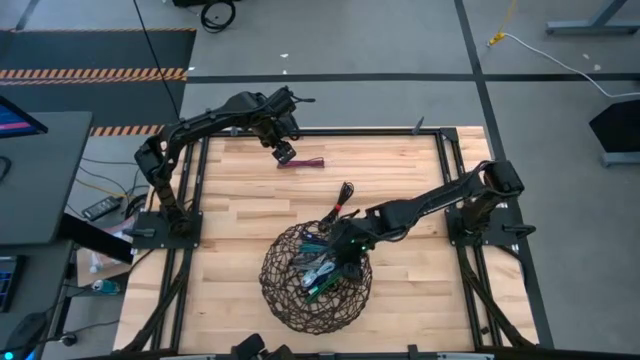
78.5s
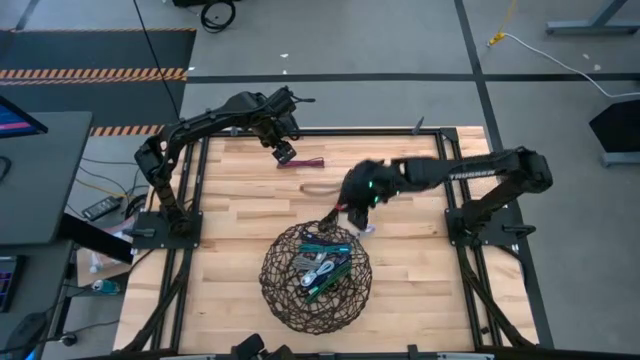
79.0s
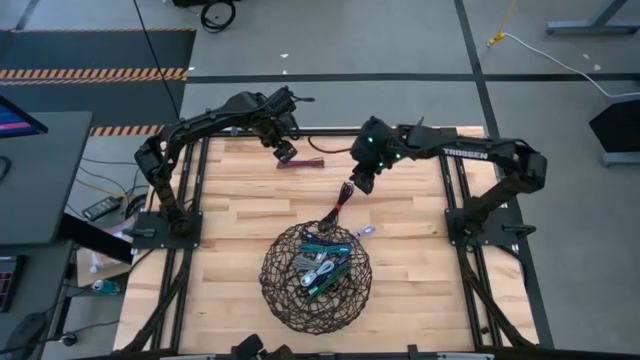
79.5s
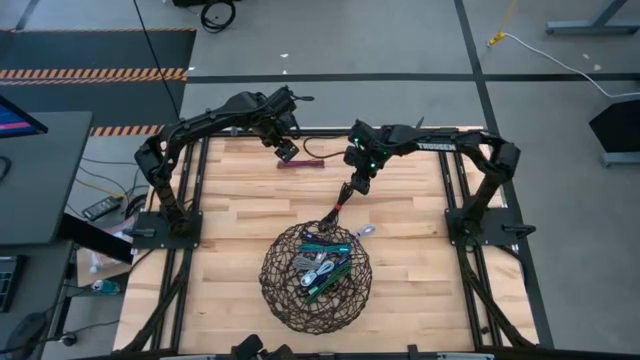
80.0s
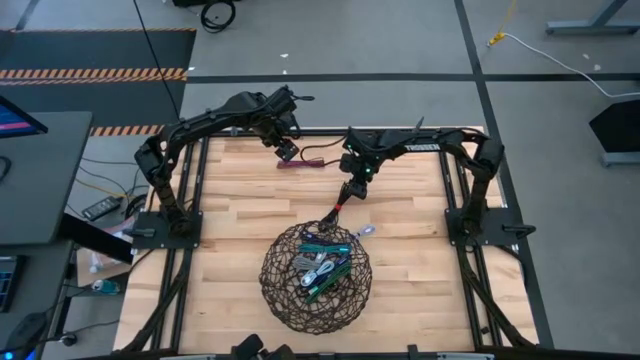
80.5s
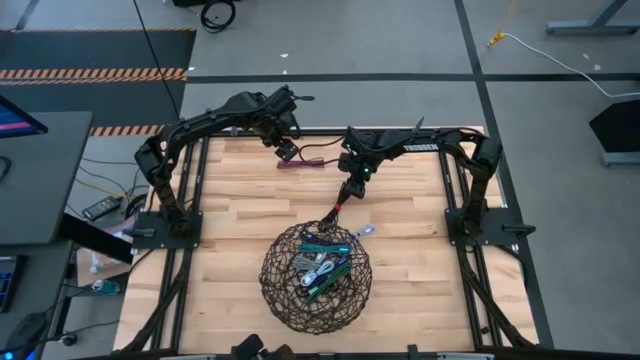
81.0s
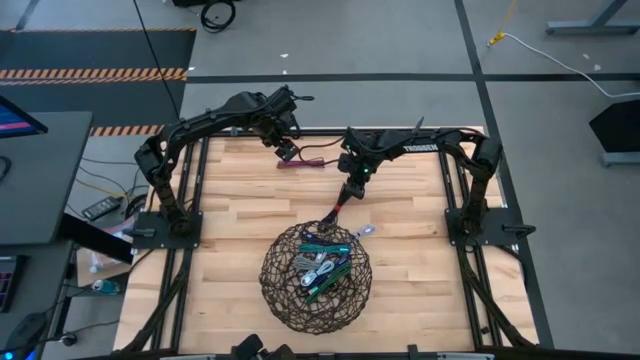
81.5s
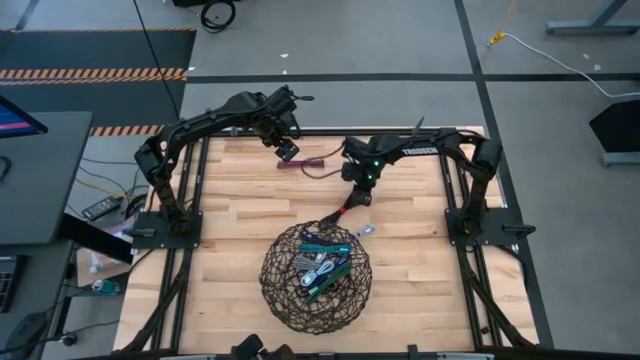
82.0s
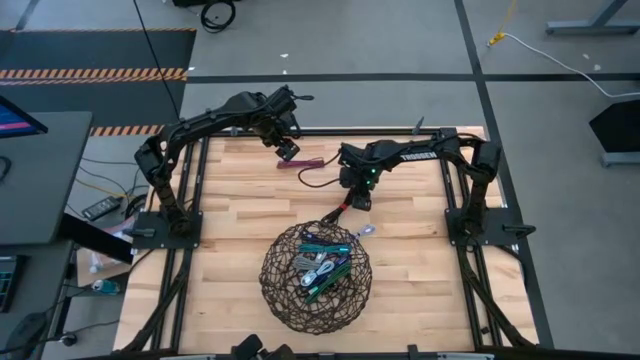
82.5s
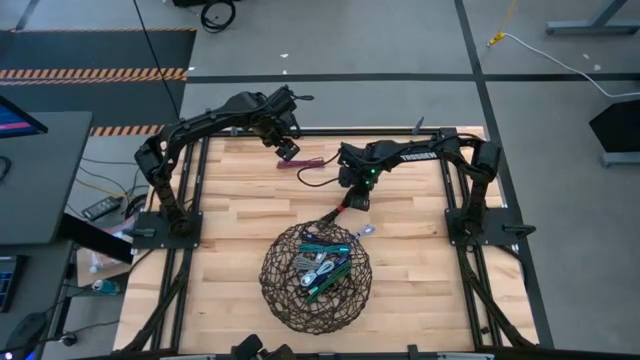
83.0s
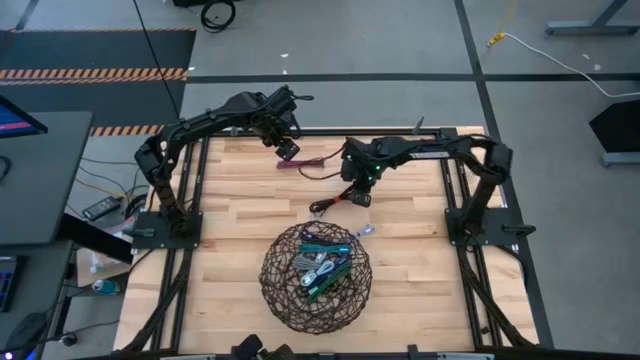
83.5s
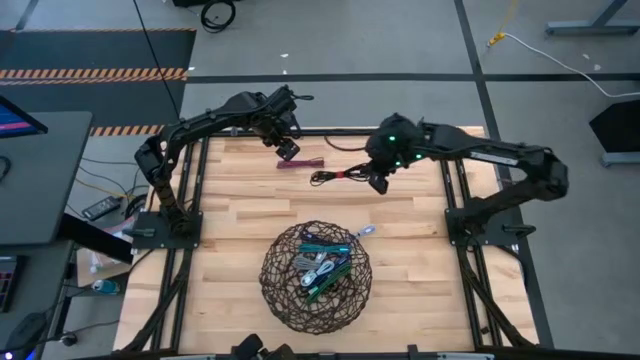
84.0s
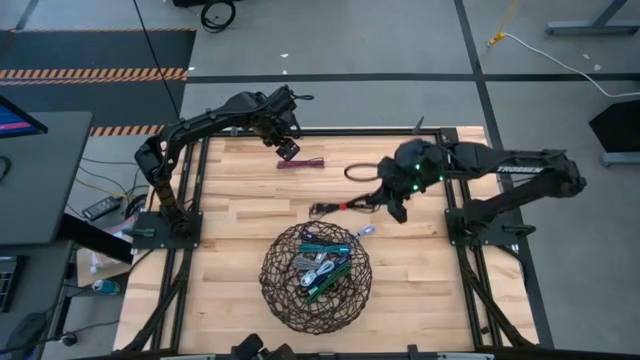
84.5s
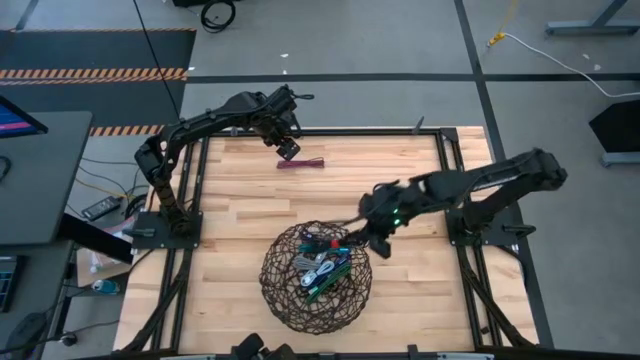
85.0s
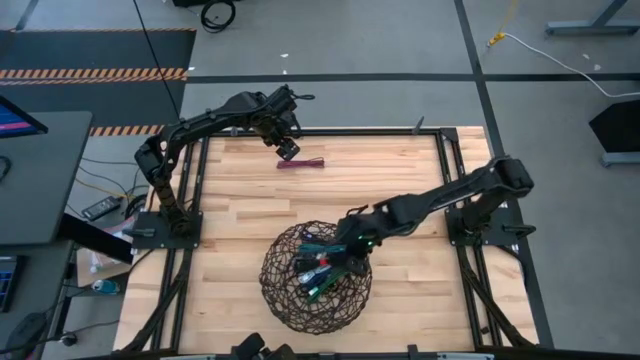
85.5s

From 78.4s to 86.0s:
Task: Pick and place USB-C Cables
Put the black charger cable into the wire basket

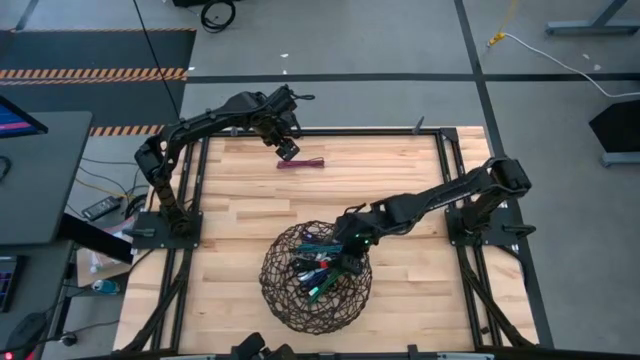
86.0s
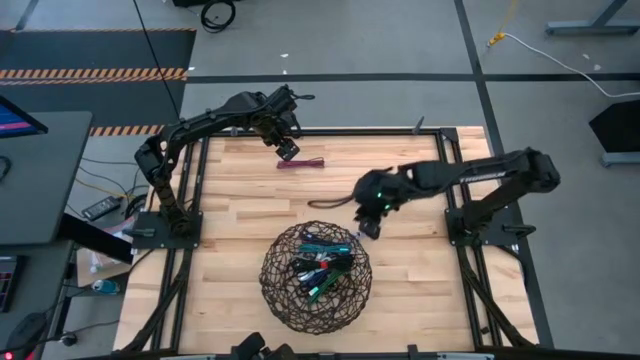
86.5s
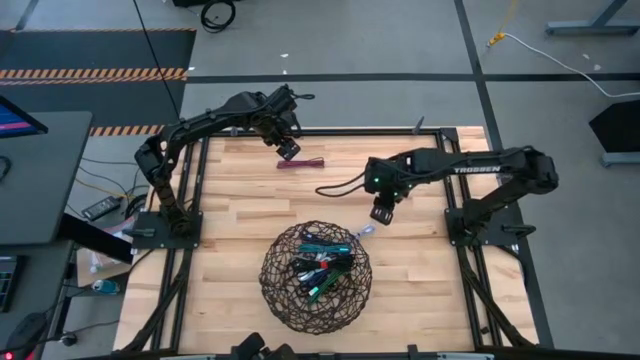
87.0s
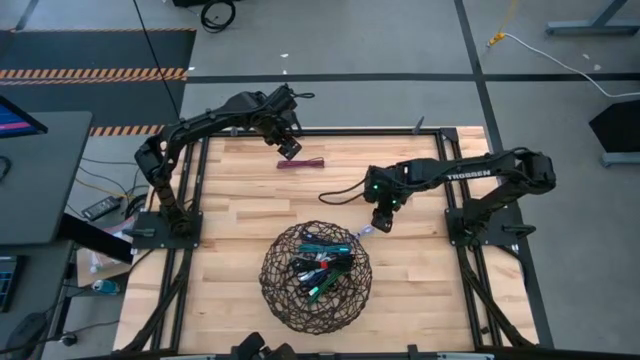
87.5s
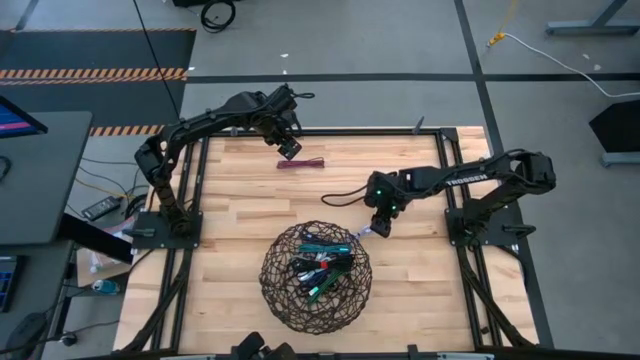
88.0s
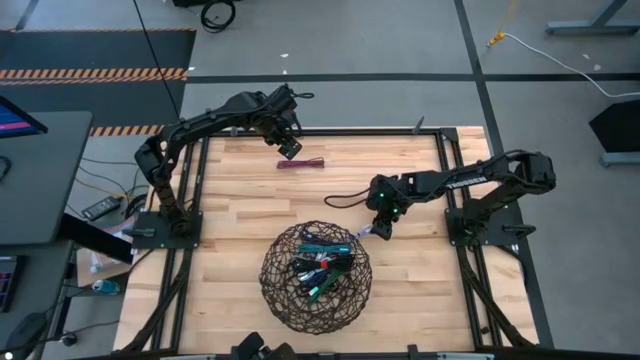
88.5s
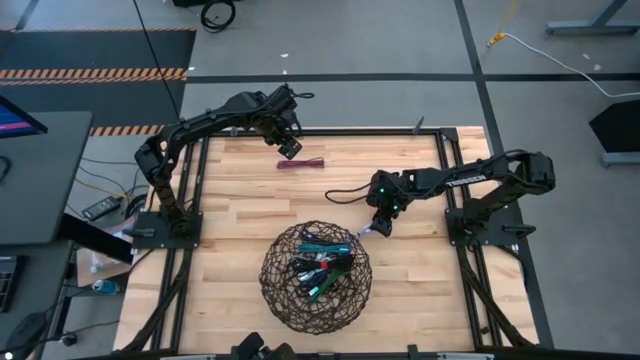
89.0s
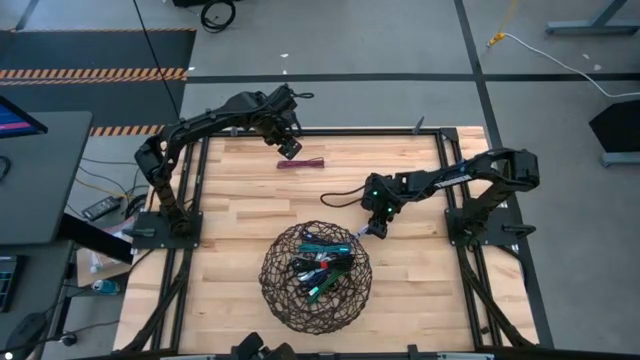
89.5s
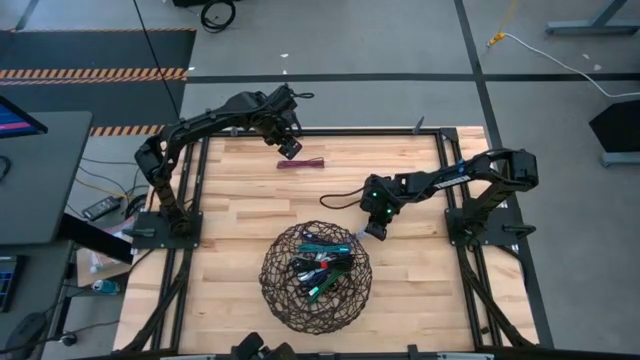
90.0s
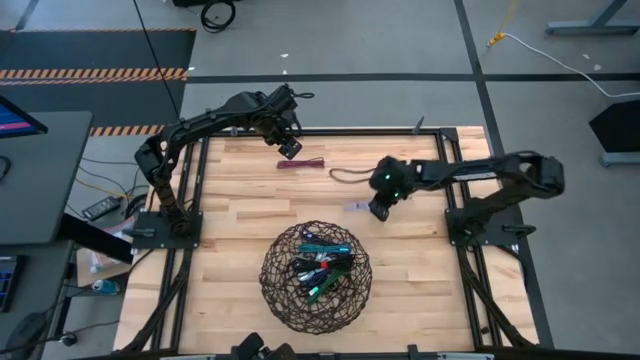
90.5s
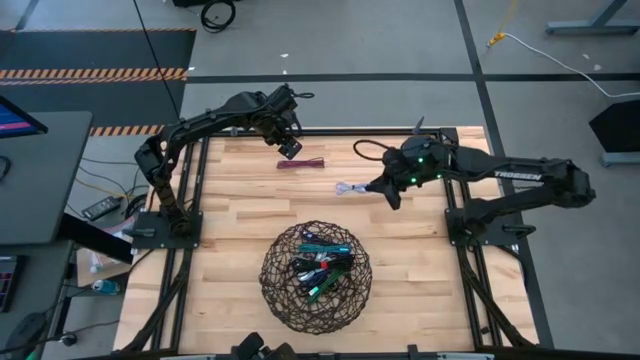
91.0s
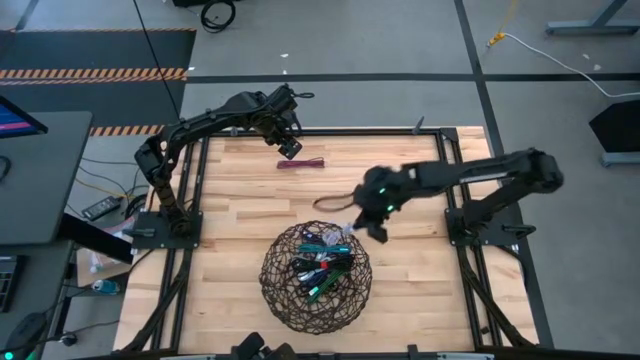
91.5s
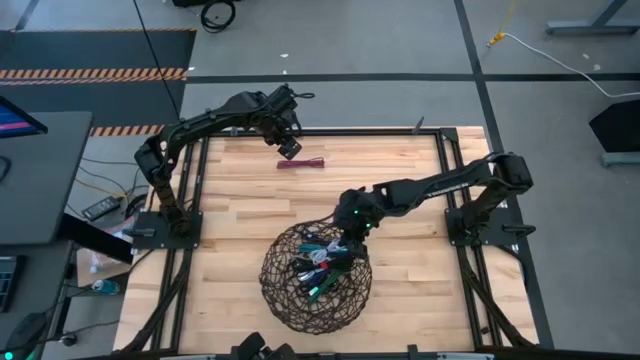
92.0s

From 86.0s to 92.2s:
Put the purple charger cable into the wire basket

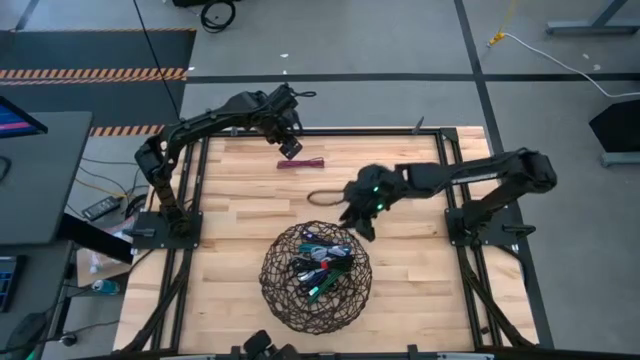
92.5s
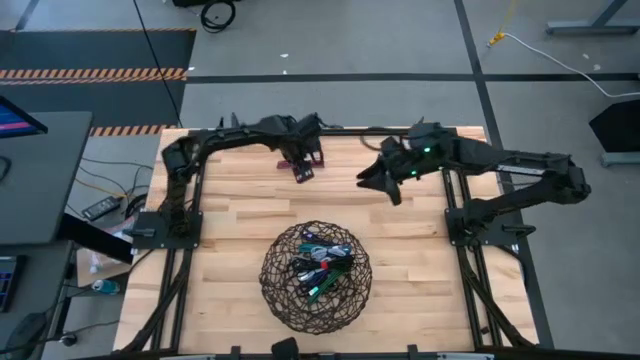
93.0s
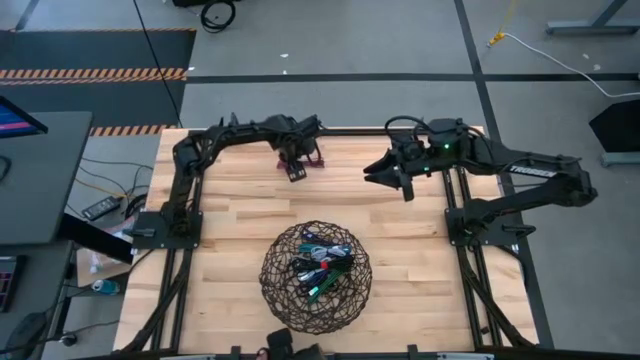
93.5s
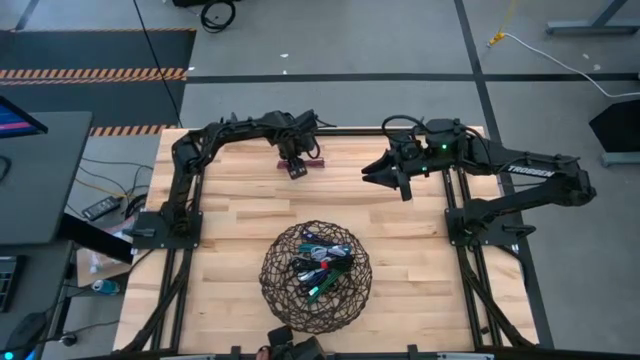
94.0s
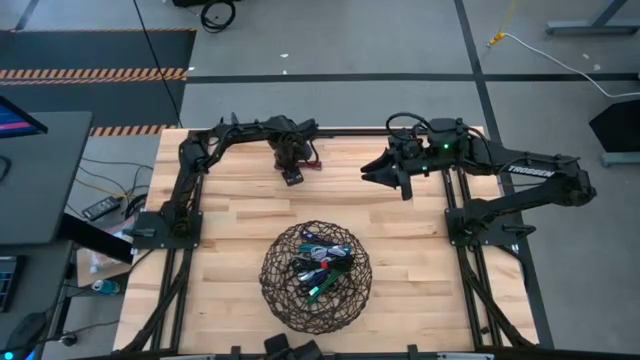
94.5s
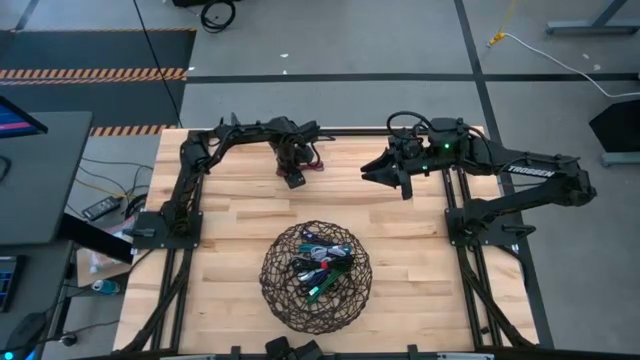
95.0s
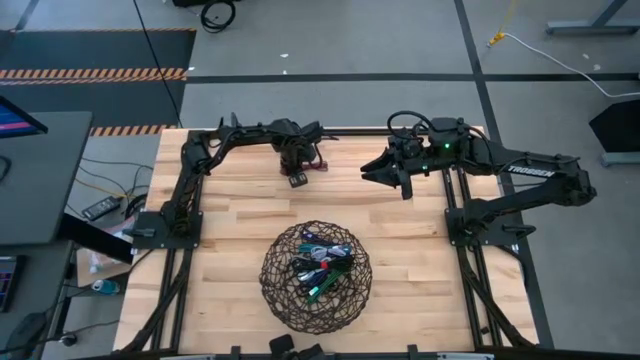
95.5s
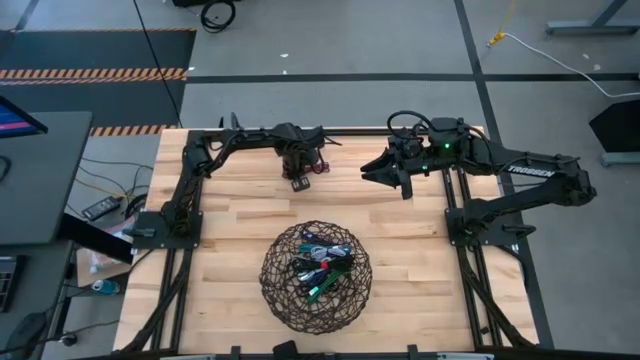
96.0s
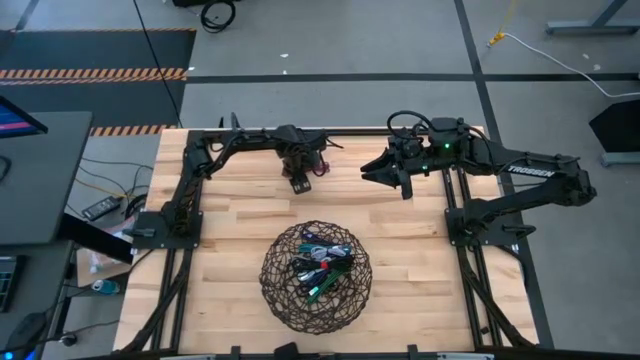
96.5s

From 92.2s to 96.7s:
Put the red charger cable into the wire basket

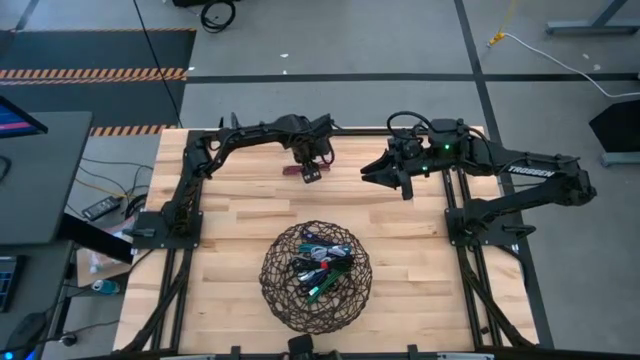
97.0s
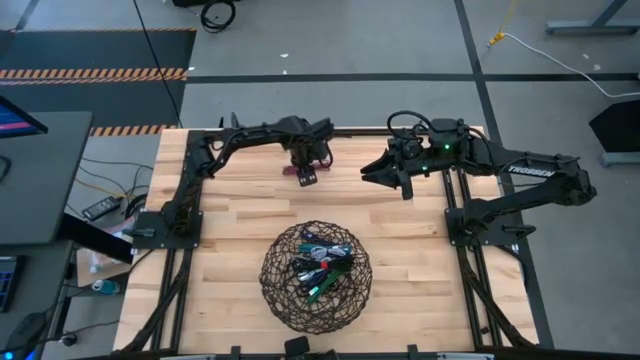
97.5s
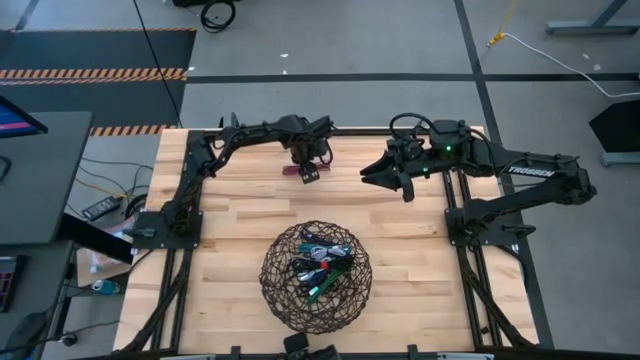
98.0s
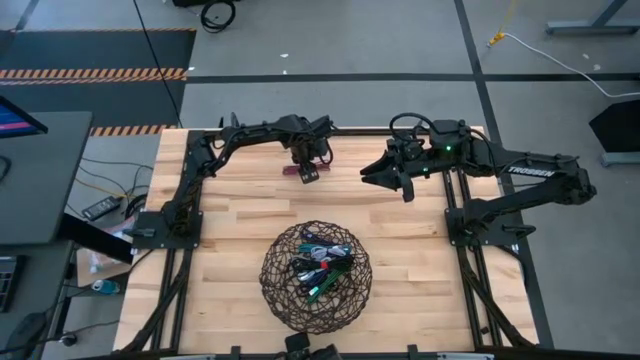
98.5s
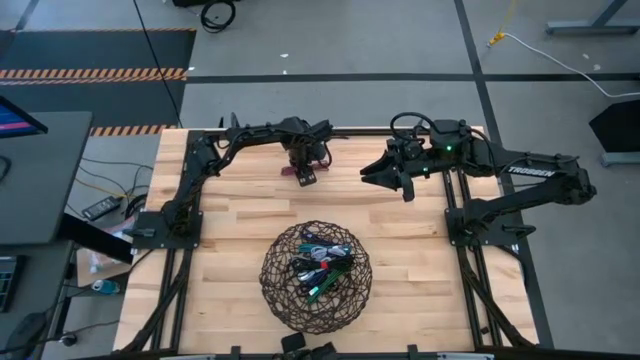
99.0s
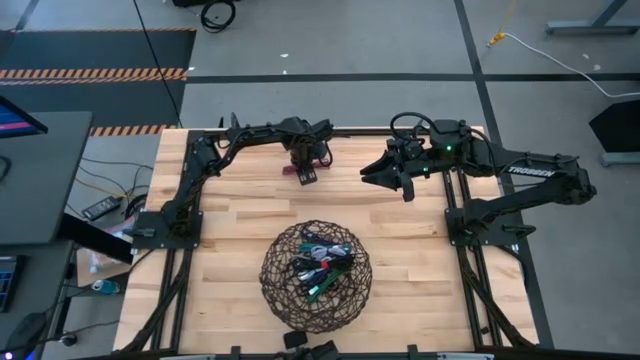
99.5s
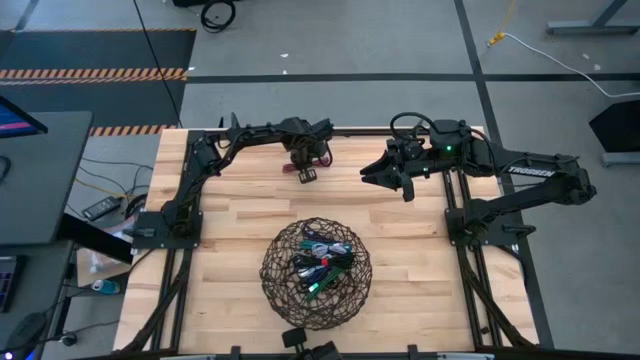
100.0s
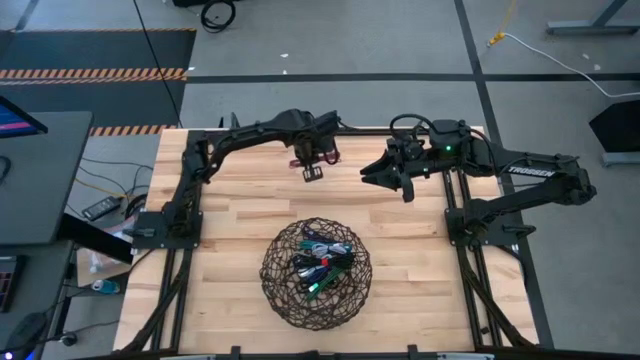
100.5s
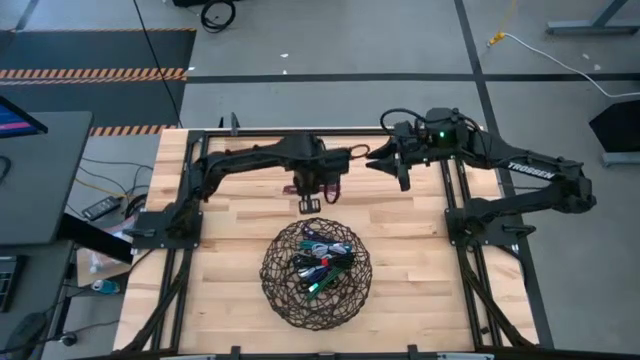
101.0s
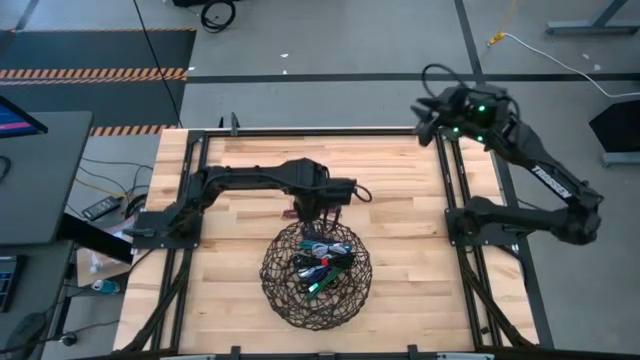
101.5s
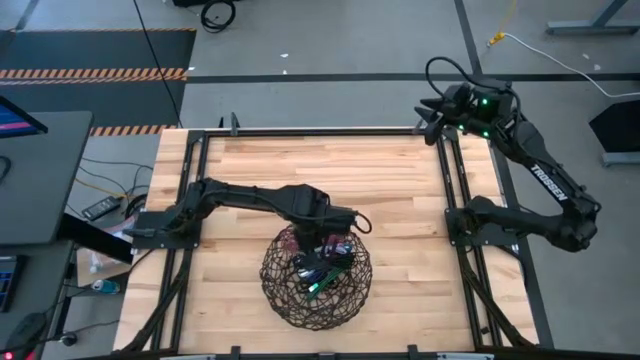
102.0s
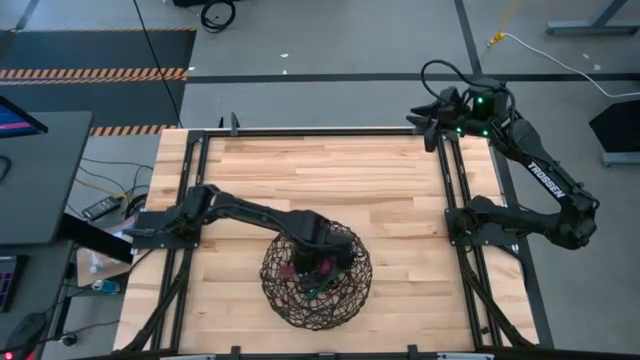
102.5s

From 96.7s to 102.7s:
Put the red charger cable into the wire basket
